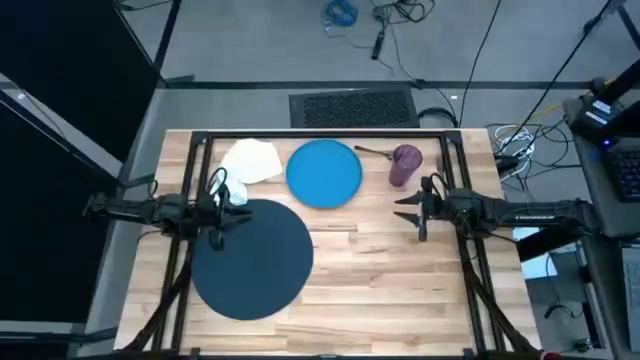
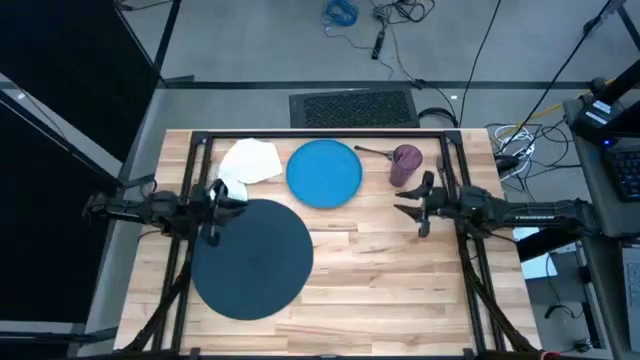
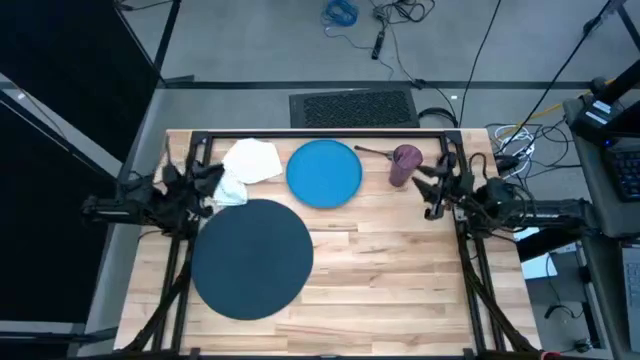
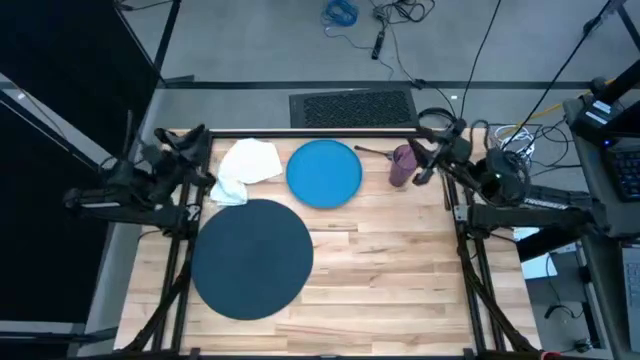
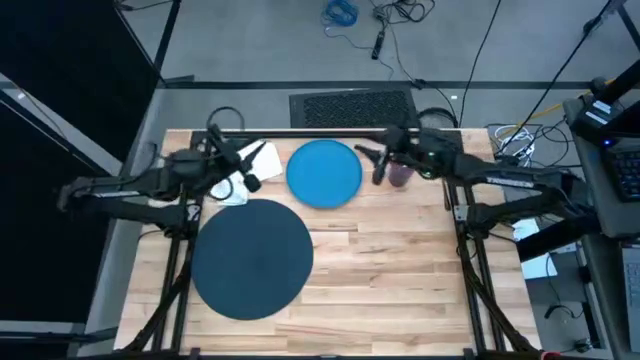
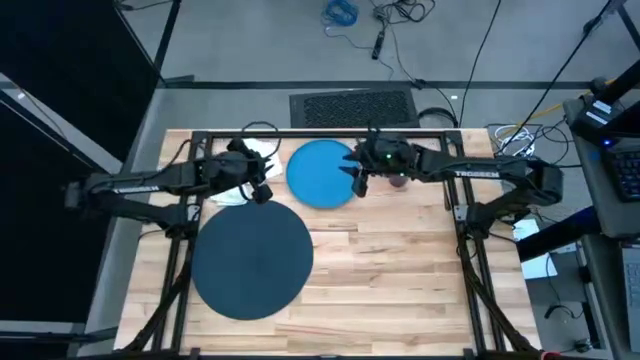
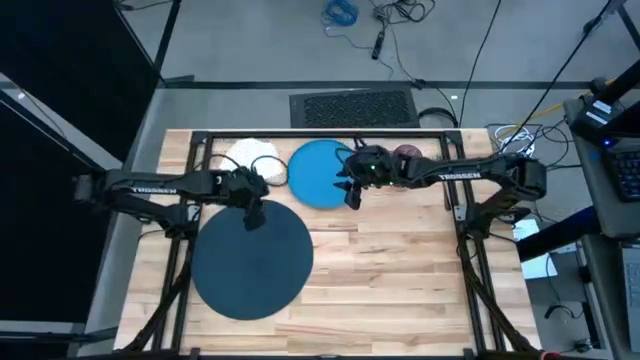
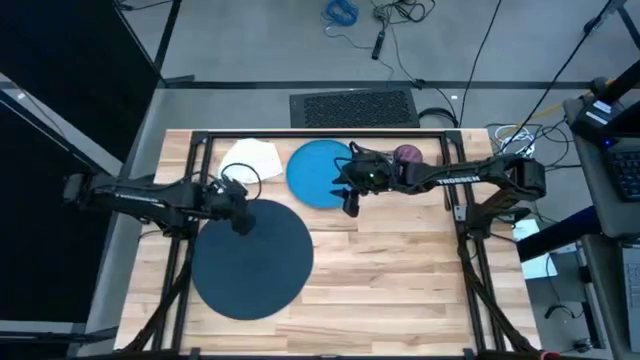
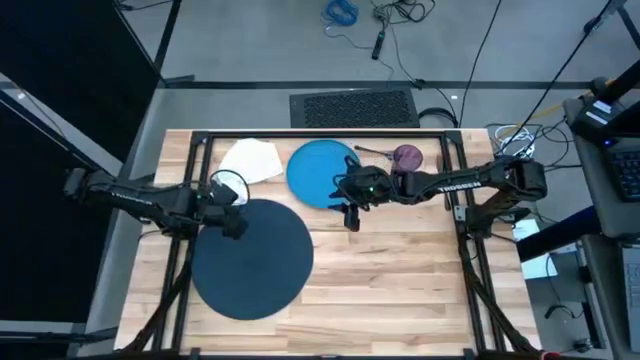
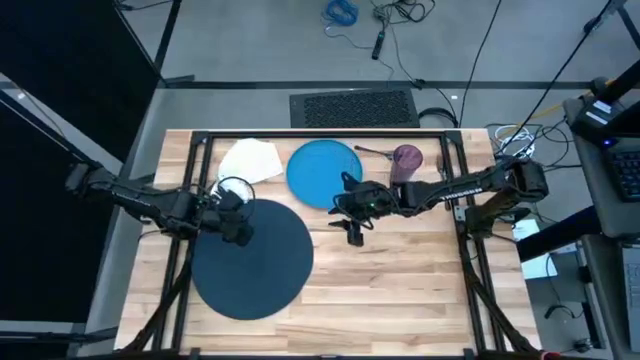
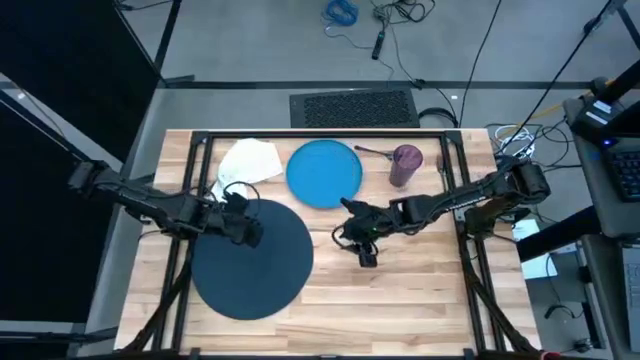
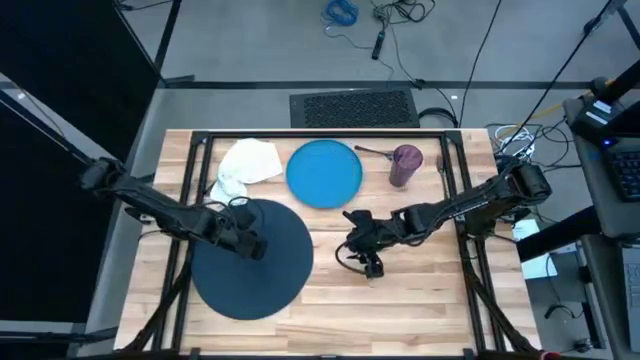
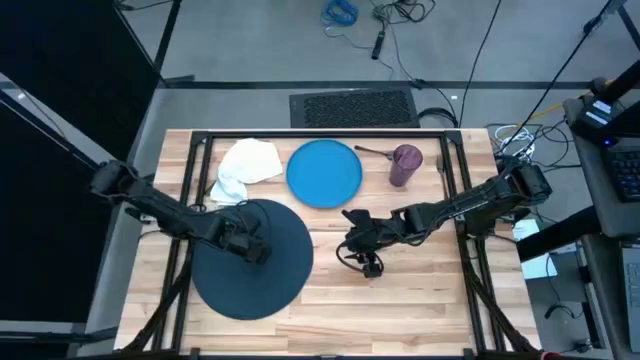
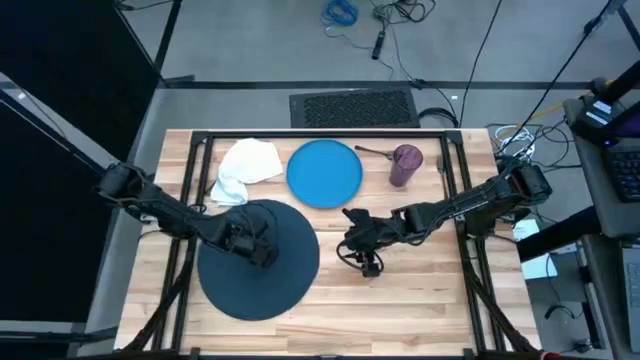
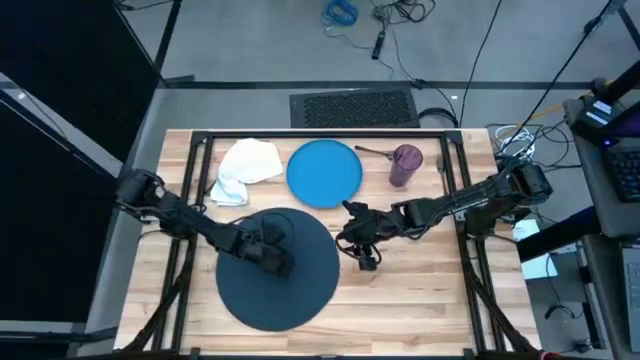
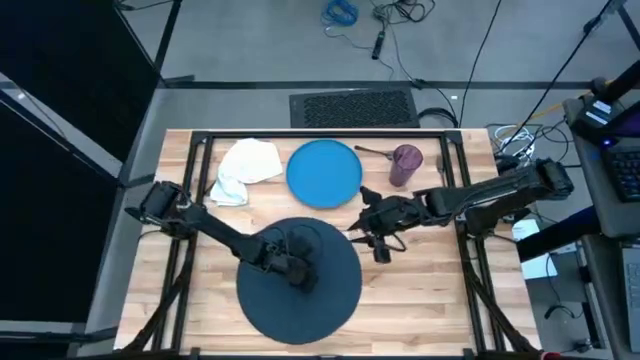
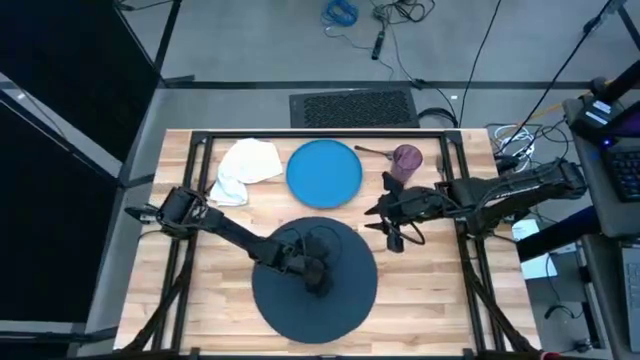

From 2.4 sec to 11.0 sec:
Task: Set table place
Move the blue table mat to the center

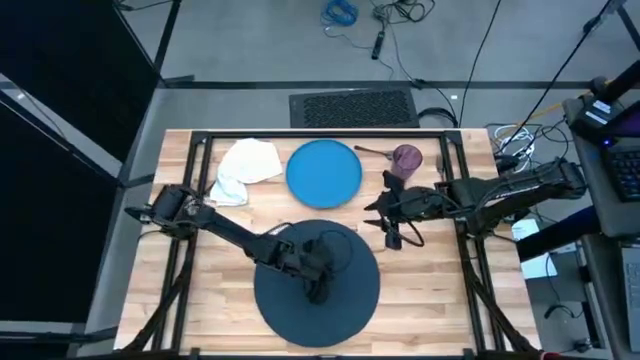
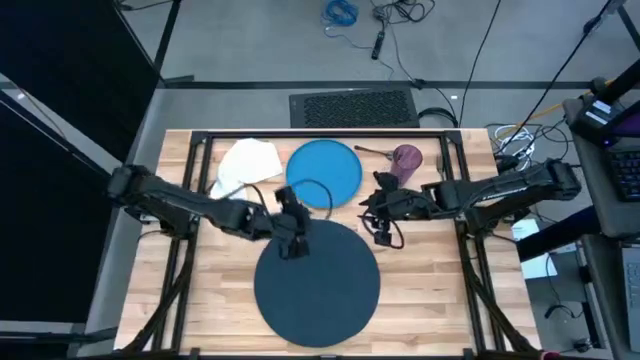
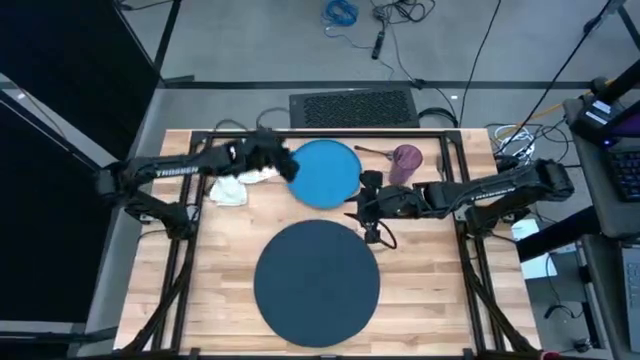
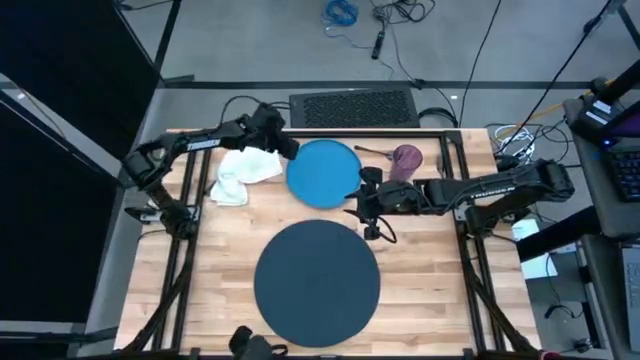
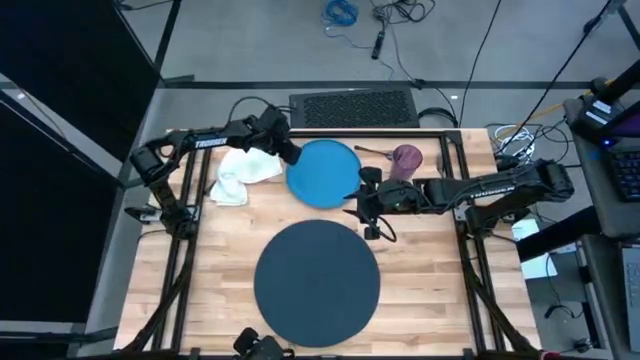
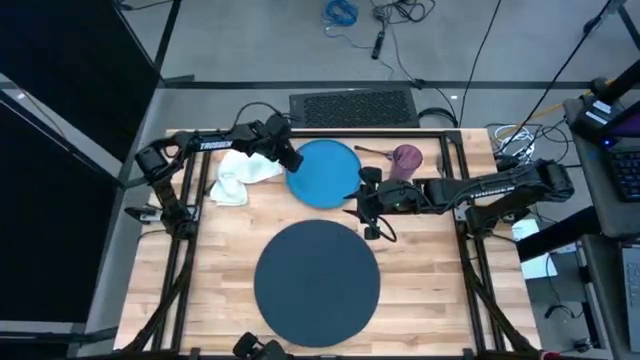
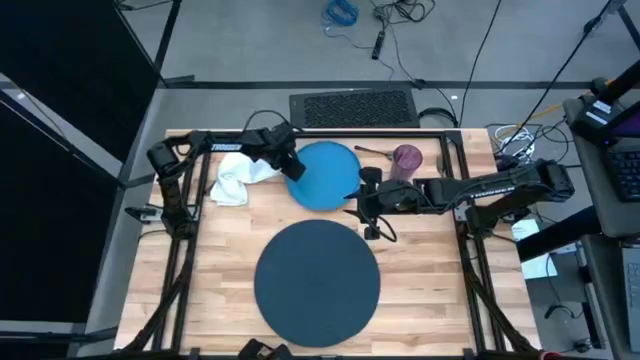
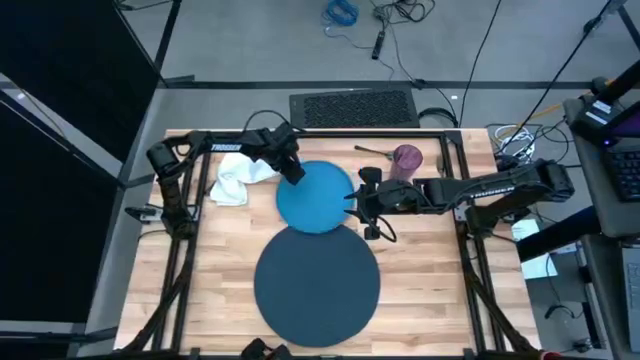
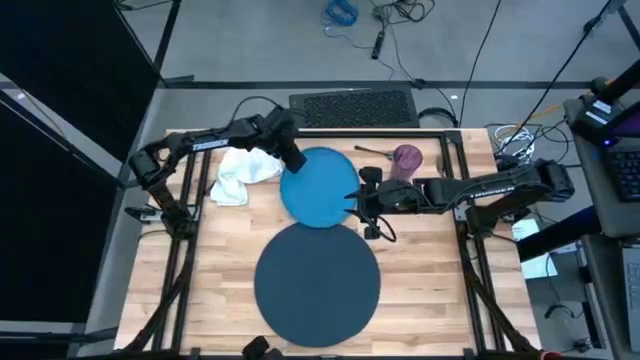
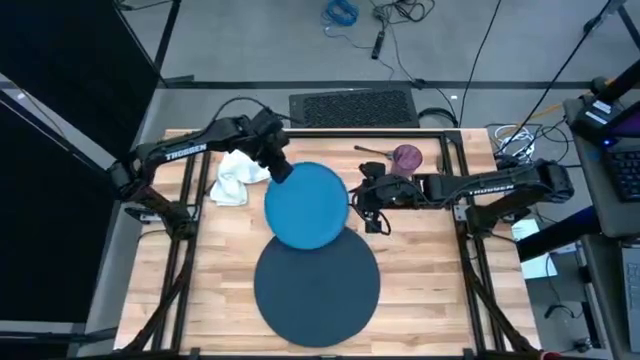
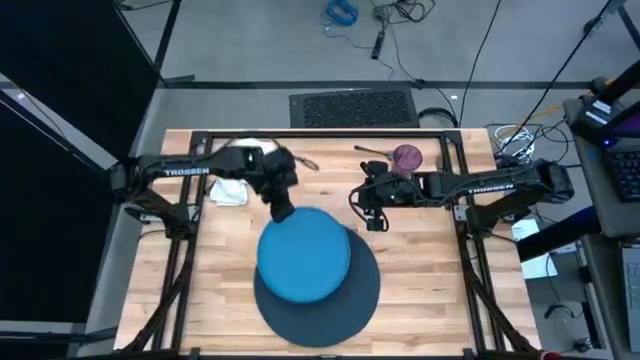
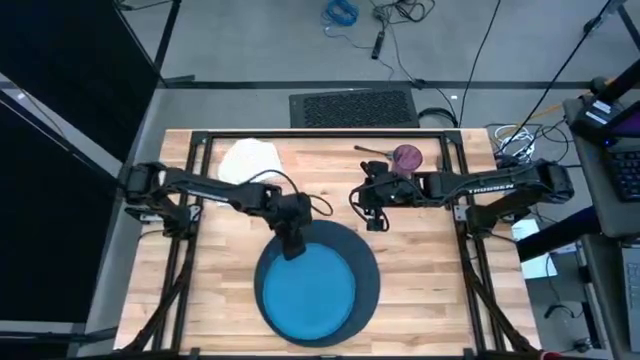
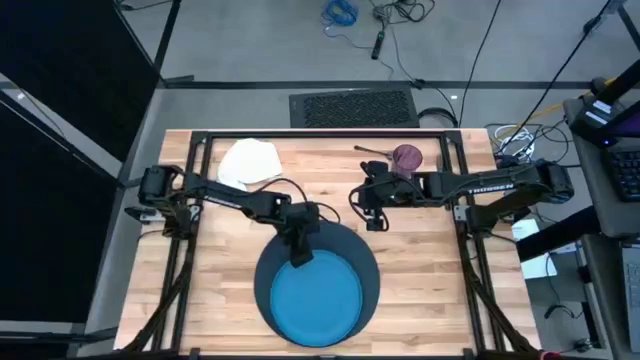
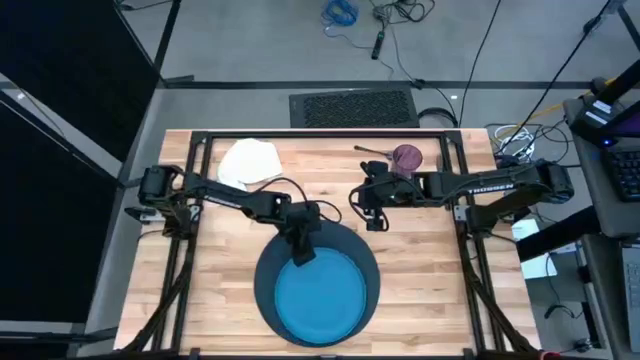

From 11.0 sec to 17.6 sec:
Put the light blue plate on top of the blue table mat

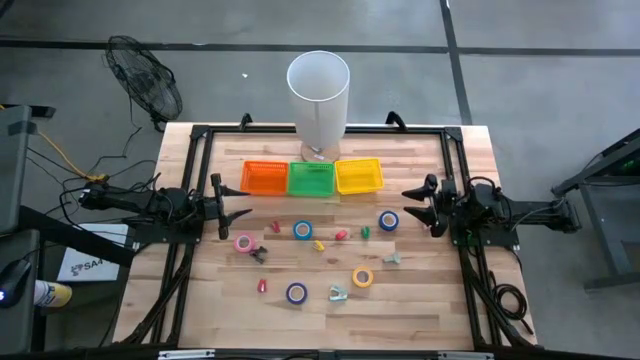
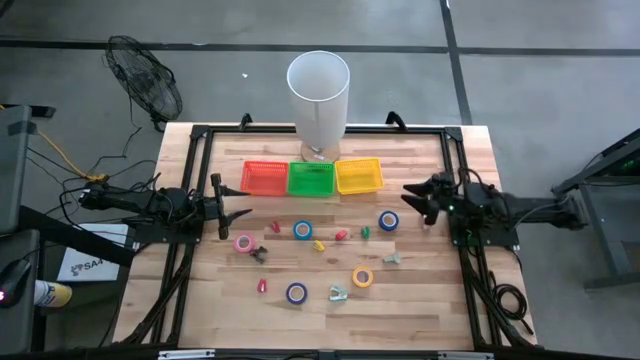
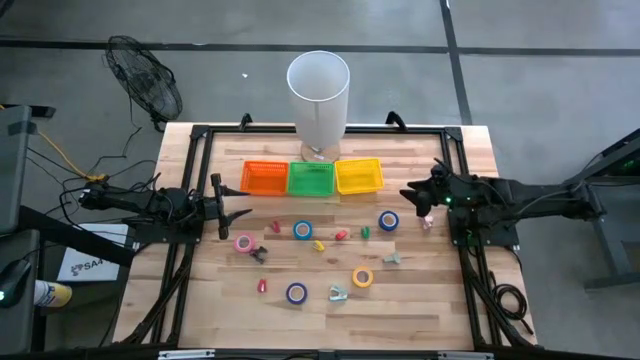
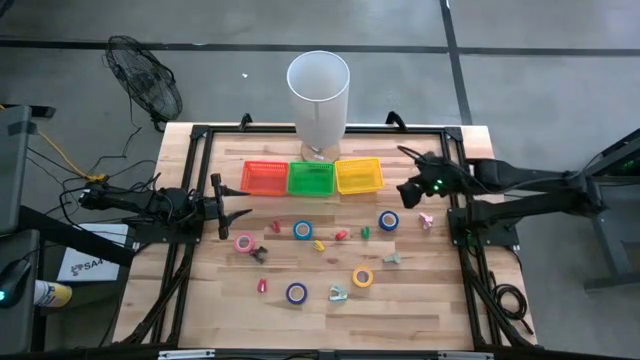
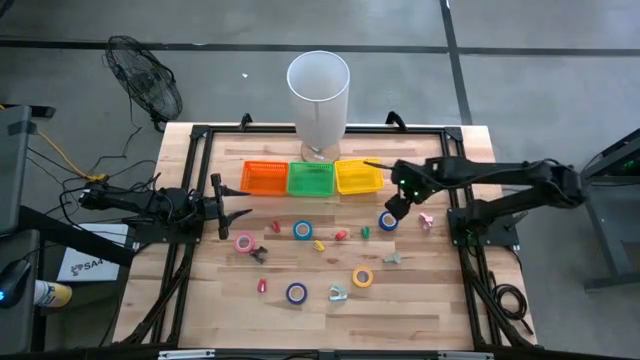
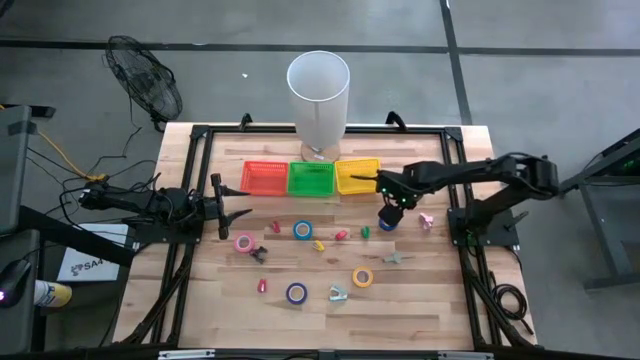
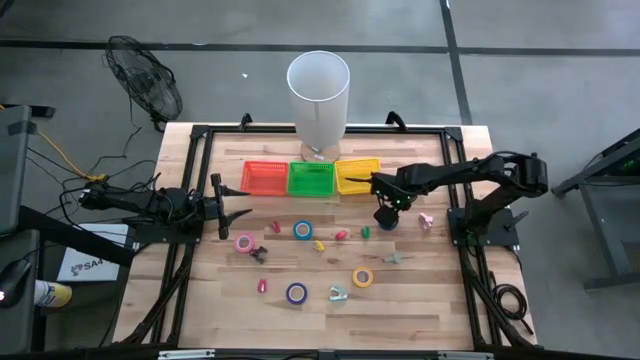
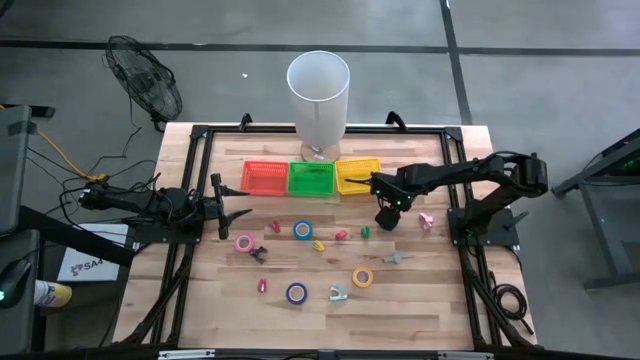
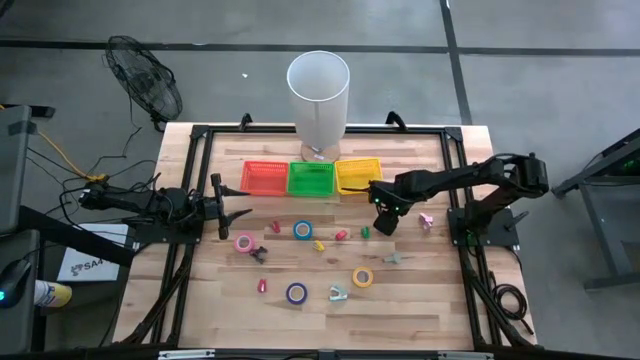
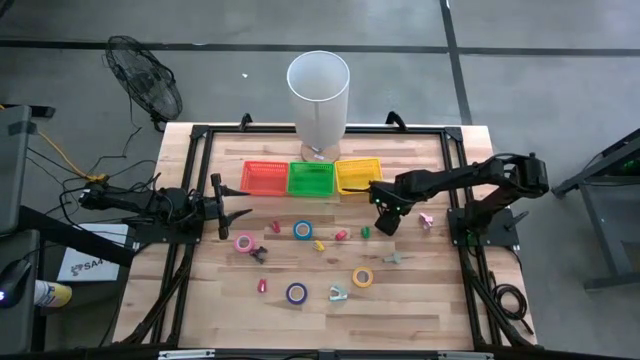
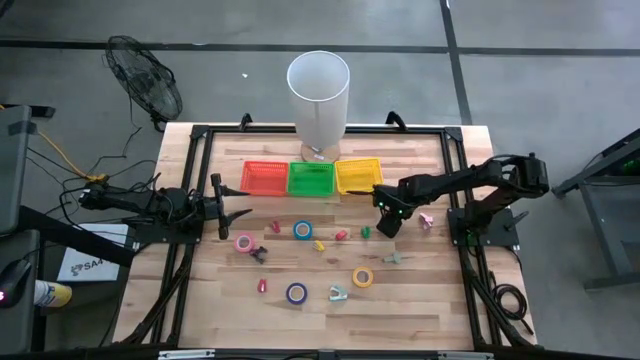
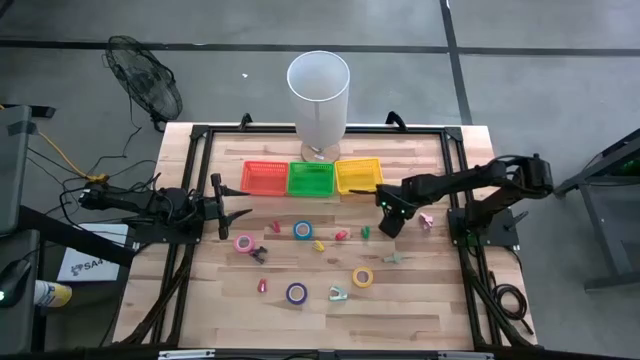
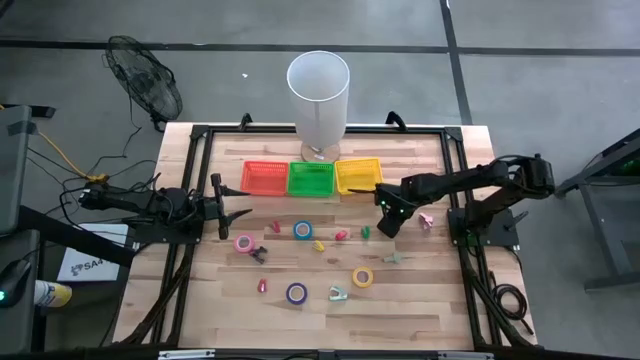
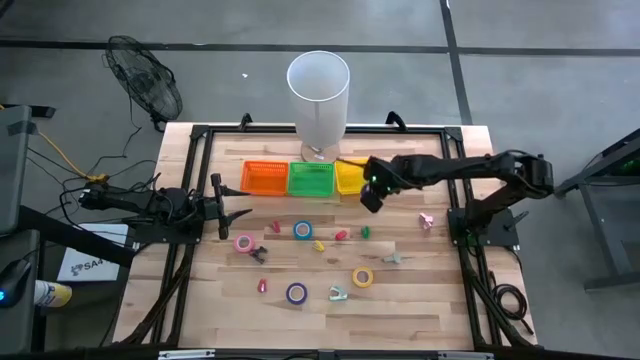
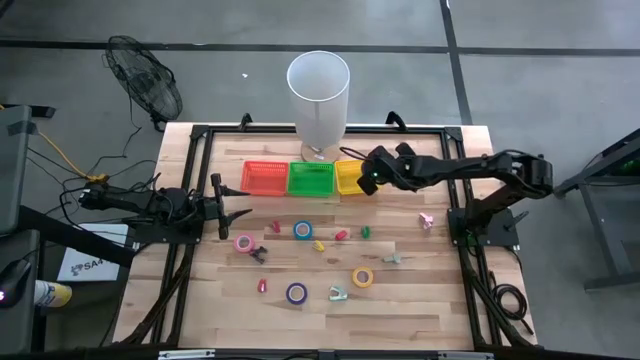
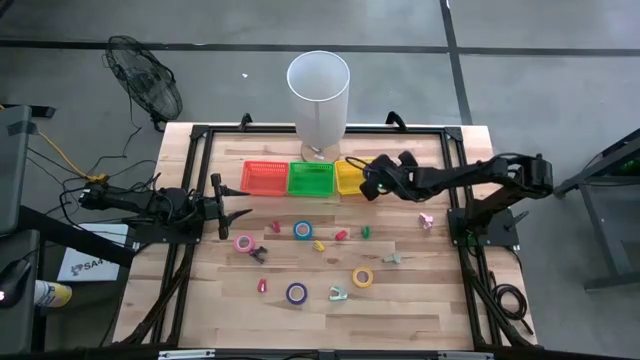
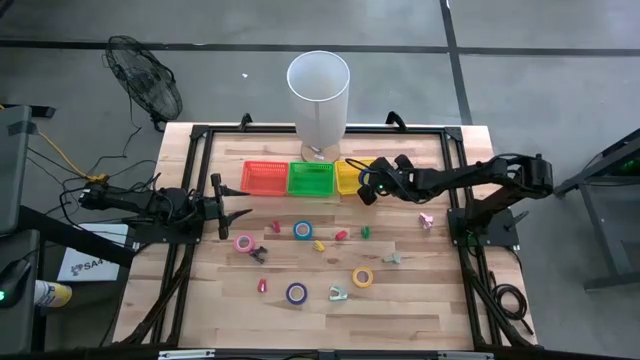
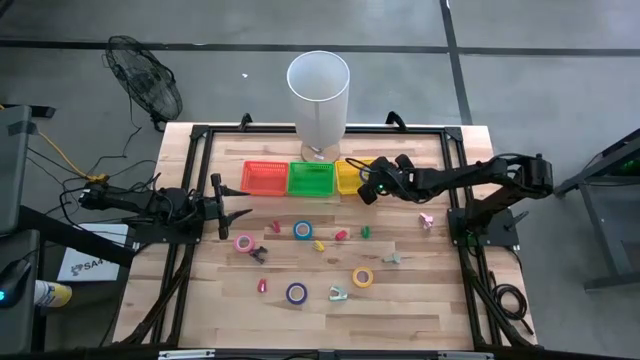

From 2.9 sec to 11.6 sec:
Task: Pick and place Stapler, Stapler remover, tape
Put the blue tape into the yellow bin
